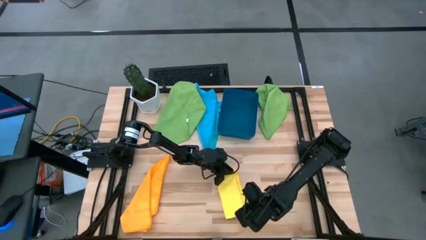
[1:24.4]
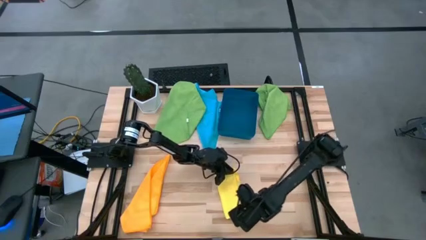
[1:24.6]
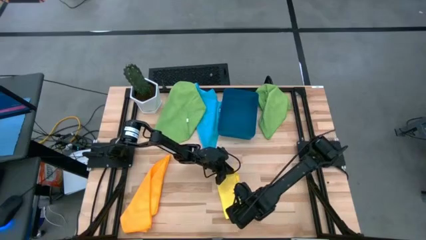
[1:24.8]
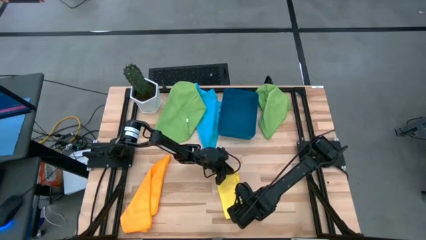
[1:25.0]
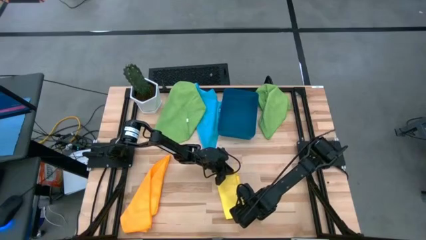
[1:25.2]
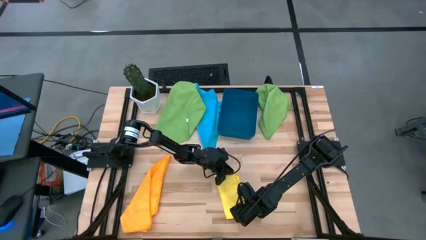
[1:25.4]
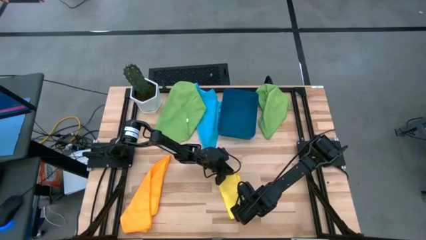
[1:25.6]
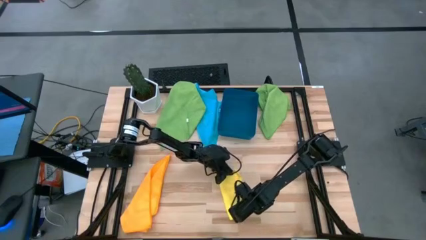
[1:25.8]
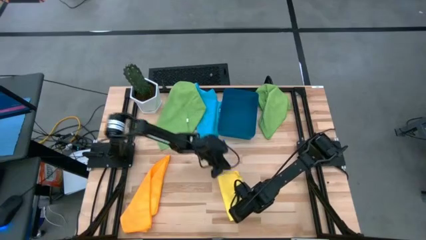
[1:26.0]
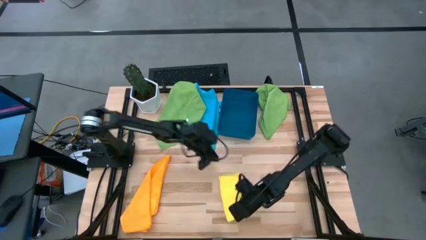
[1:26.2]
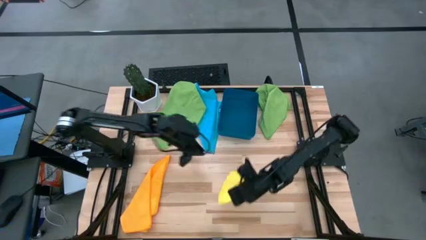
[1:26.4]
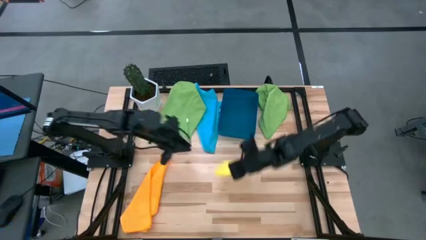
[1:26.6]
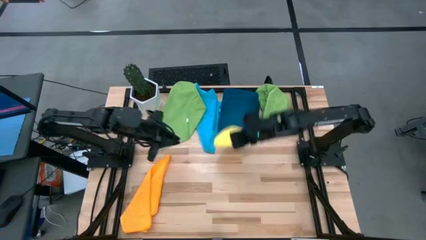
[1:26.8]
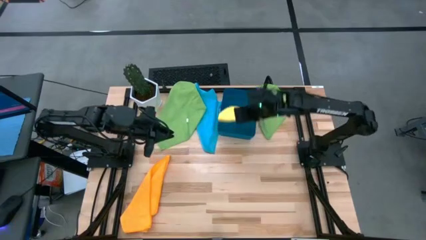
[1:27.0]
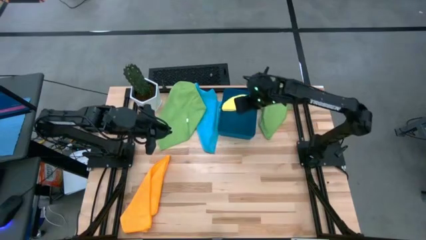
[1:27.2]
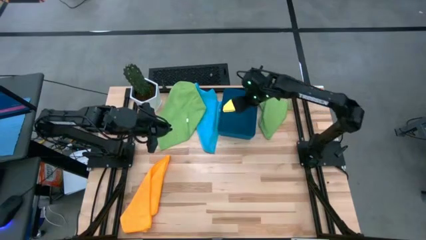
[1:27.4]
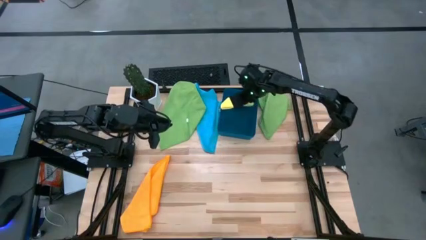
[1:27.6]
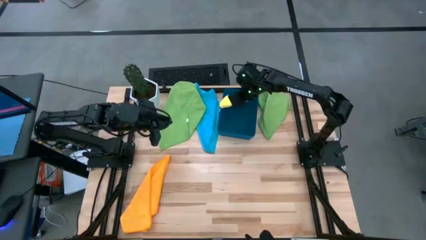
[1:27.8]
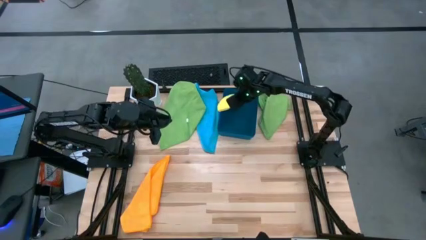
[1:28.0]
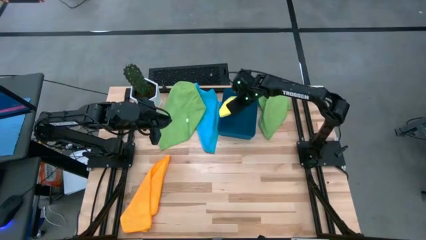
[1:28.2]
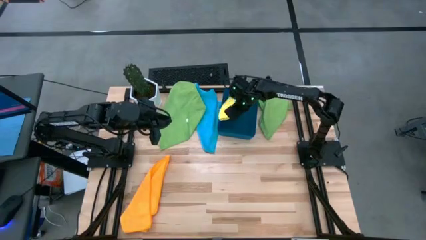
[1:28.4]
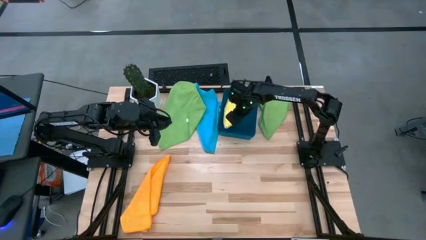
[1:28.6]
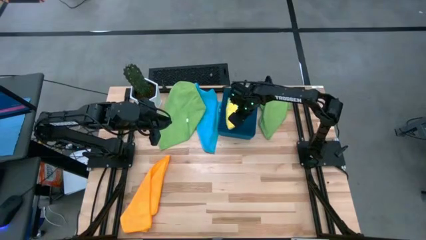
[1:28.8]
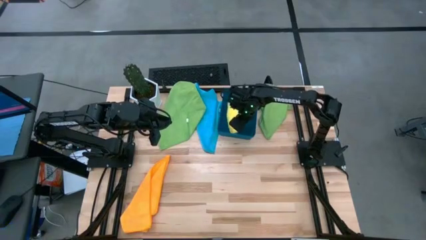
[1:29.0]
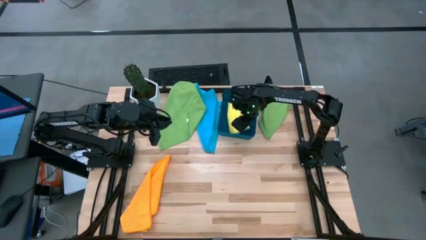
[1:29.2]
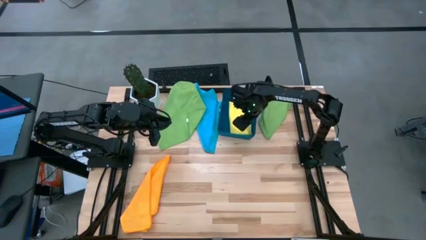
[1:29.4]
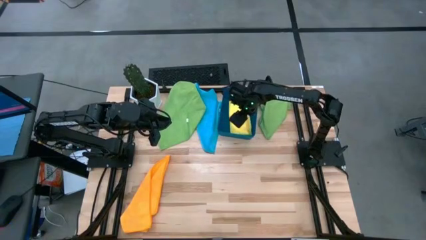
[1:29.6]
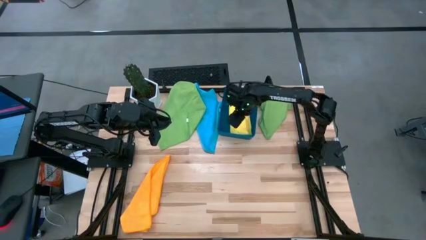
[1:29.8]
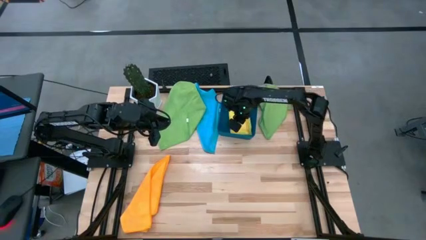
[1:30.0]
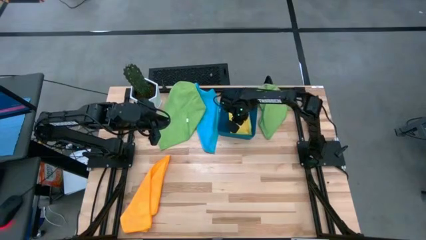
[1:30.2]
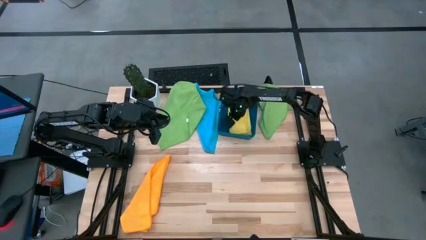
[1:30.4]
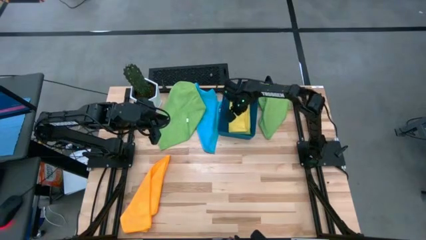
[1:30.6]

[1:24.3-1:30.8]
Task: Fold microfiber towels
Put the yellow towel into the blue bin

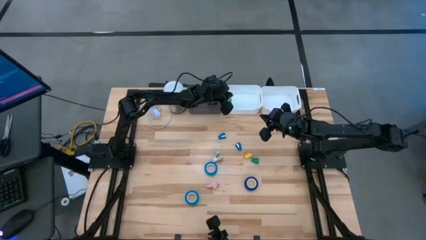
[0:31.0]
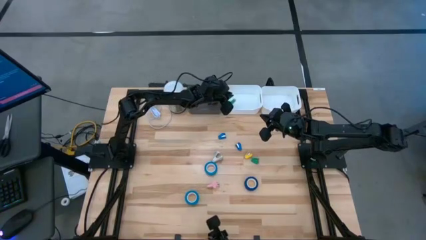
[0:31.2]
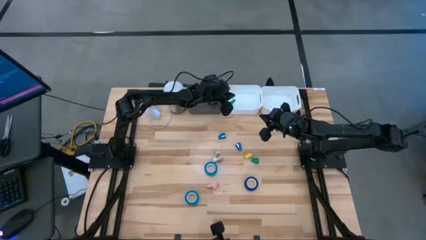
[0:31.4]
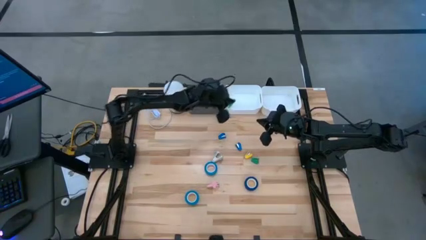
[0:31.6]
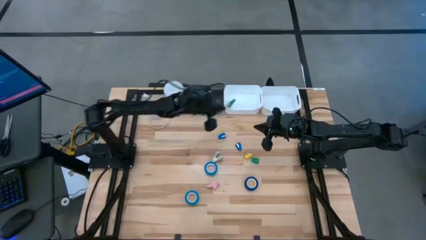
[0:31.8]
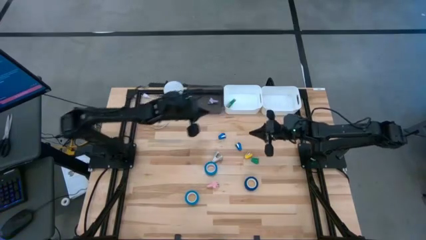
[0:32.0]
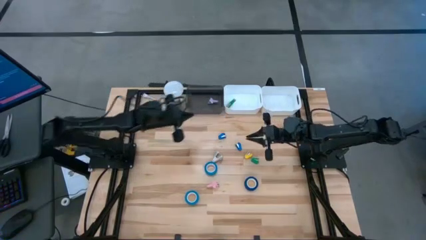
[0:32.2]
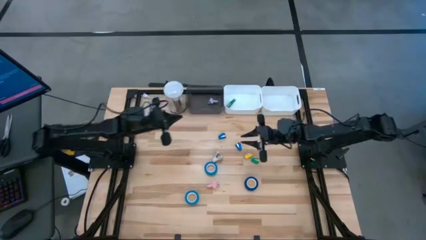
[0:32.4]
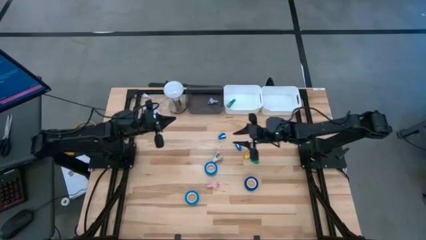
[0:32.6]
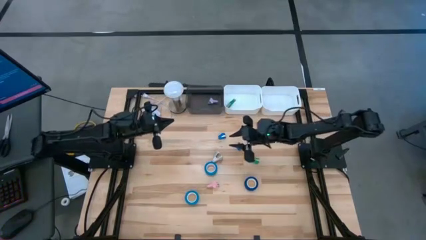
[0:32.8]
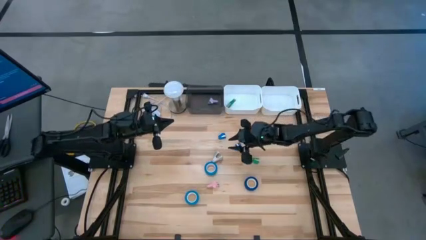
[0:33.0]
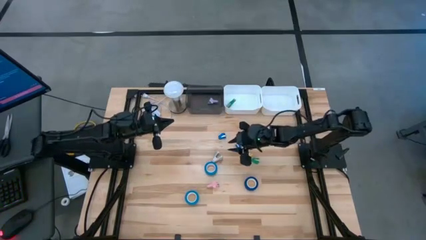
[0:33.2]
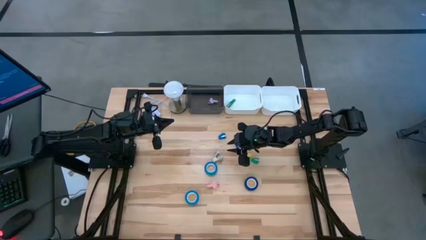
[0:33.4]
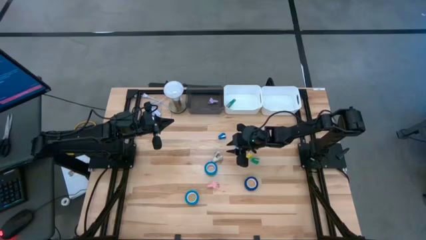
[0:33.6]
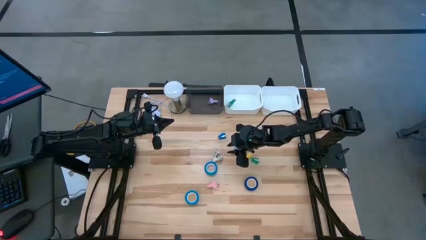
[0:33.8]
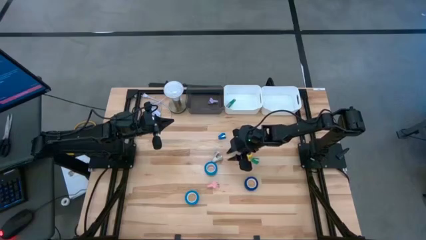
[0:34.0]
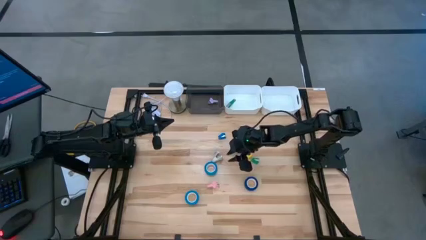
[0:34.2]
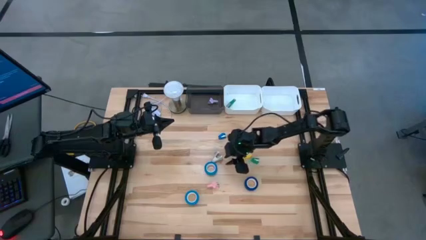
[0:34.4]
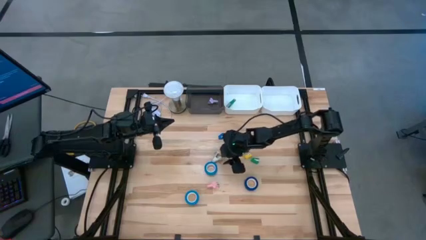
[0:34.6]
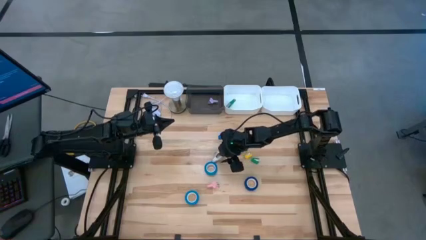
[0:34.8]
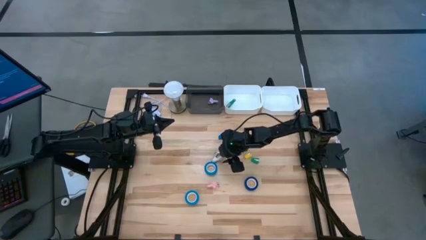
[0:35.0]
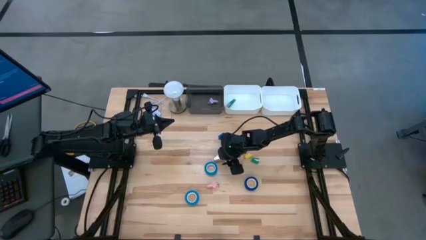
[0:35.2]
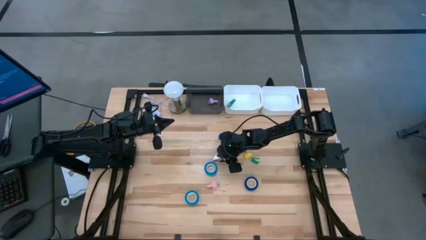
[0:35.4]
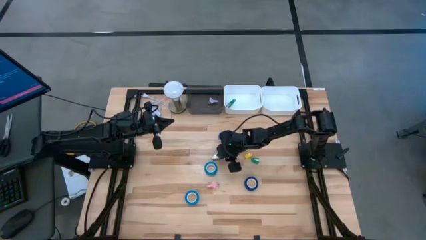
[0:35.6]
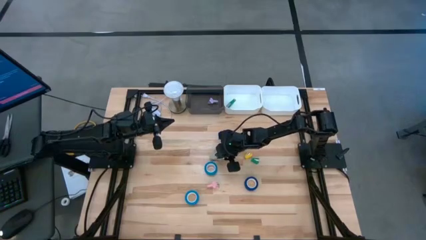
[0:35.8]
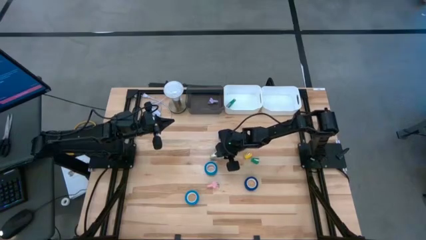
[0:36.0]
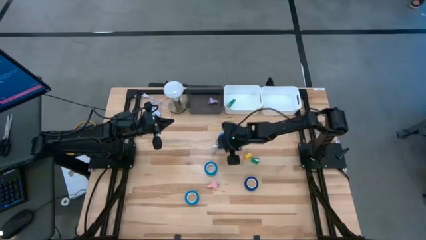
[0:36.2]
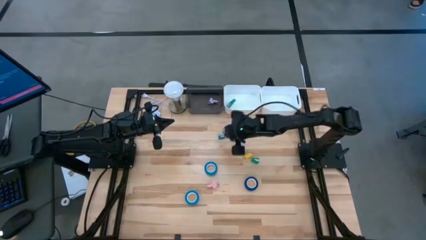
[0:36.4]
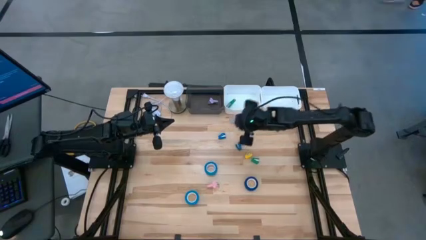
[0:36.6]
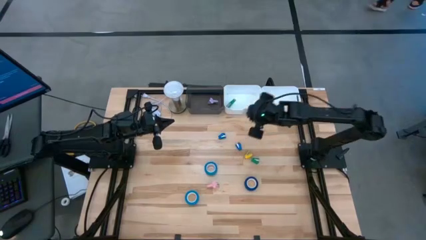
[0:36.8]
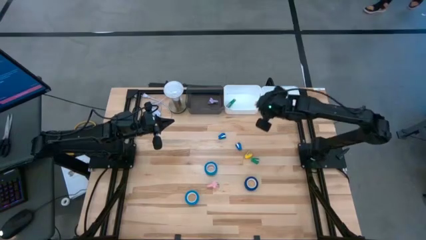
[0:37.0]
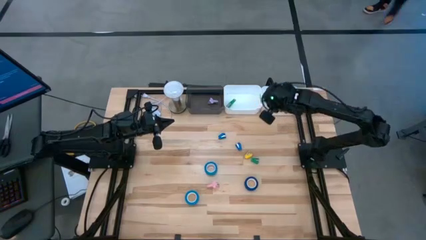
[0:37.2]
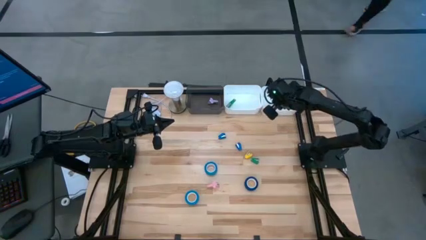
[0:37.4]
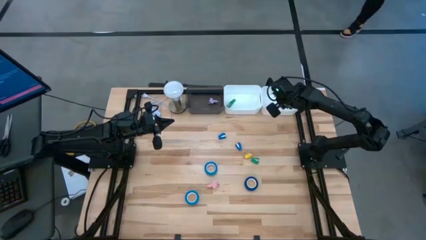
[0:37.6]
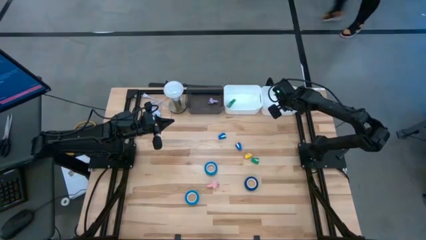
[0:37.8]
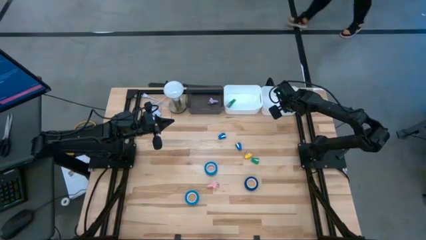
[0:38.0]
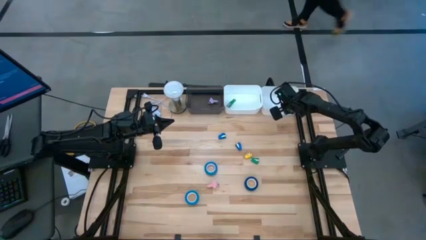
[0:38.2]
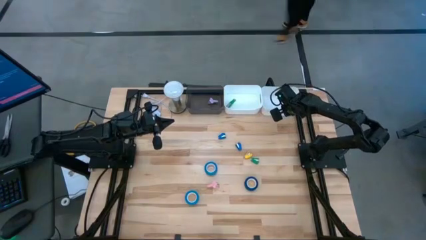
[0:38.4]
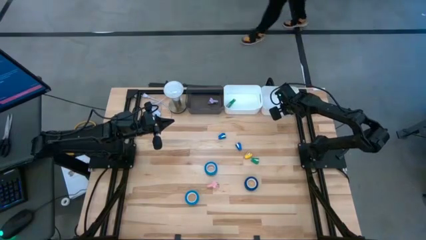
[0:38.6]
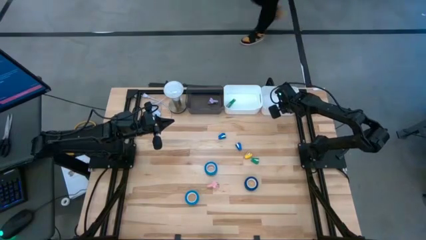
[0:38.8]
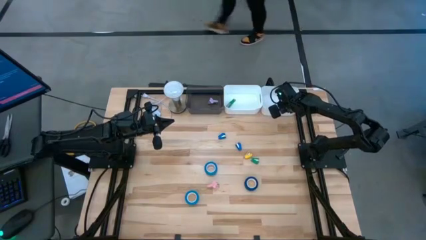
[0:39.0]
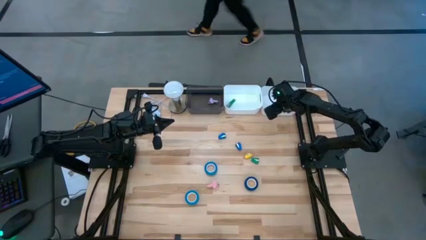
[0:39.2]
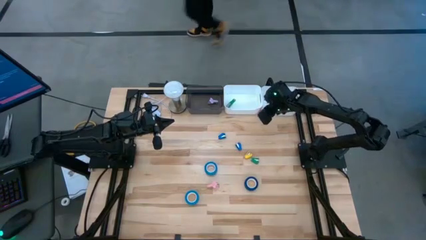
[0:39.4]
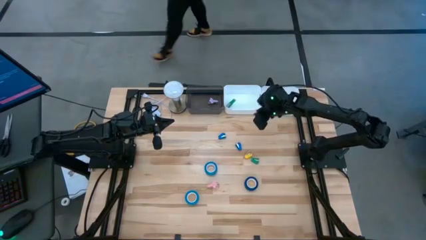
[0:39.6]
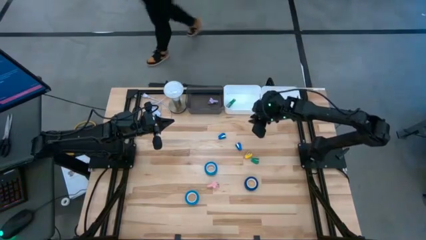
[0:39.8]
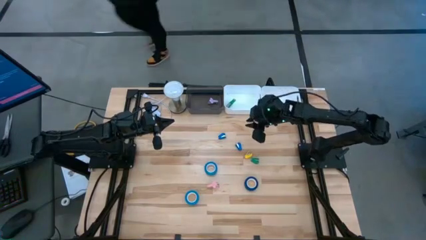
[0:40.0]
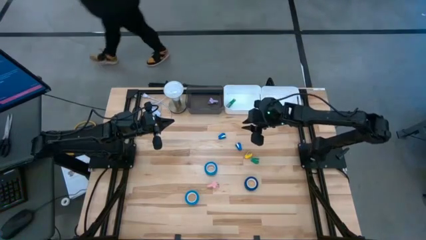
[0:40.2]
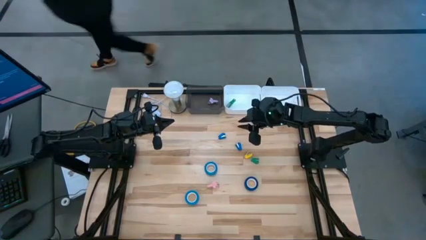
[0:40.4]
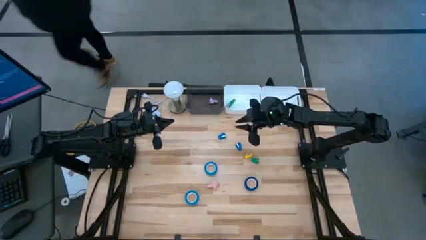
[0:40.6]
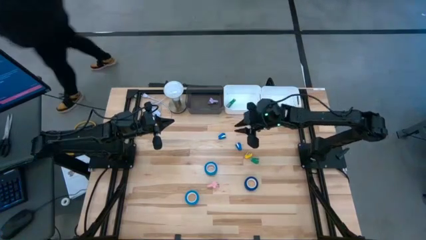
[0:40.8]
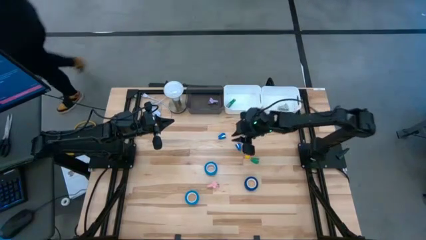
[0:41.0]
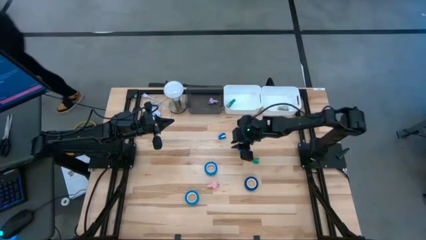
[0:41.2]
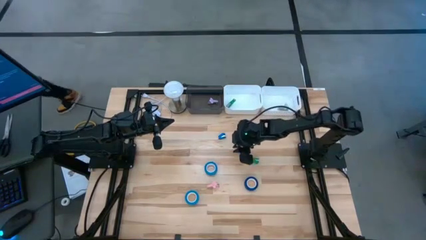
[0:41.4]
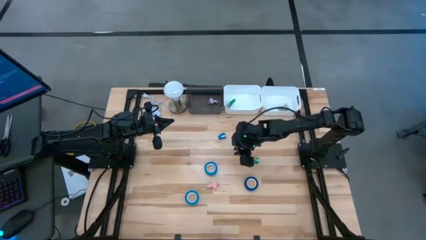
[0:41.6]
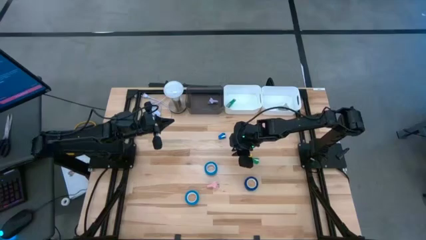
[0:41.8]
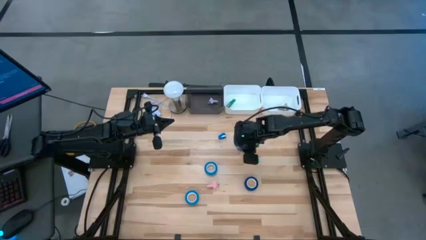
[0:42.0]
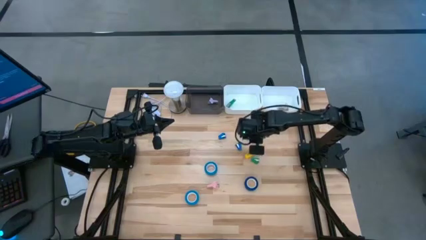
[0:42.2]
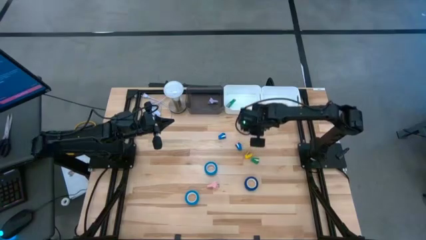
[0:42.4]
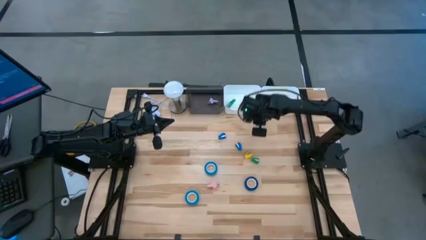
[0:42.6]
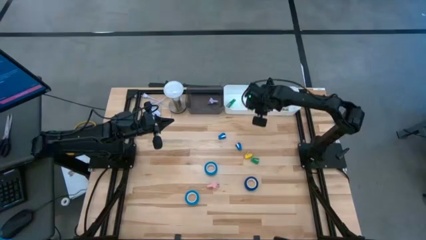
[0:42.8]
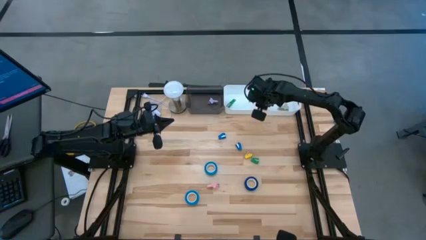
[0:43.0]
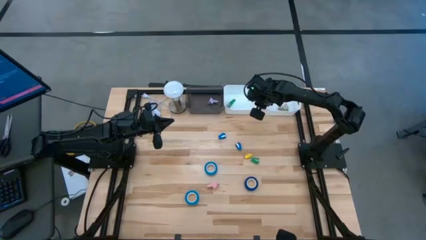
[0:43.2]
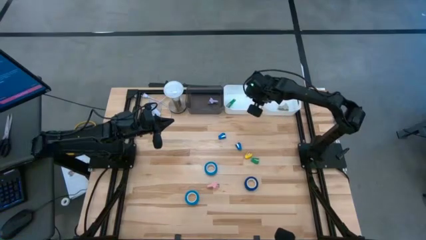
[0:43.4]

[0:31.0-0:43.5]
Task: Pick and place Stapler, Stapler remover, tape
Put the gray staple remover into the black bin
